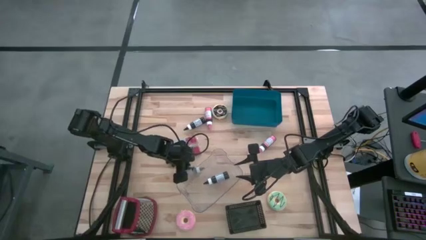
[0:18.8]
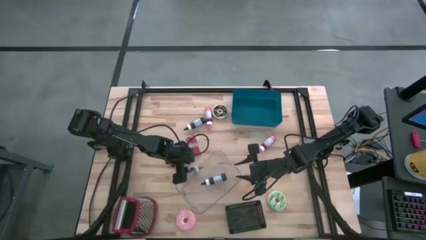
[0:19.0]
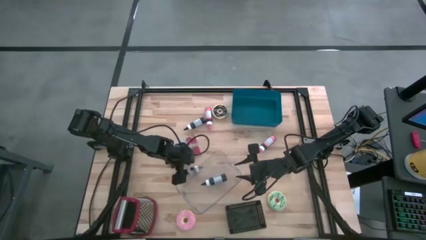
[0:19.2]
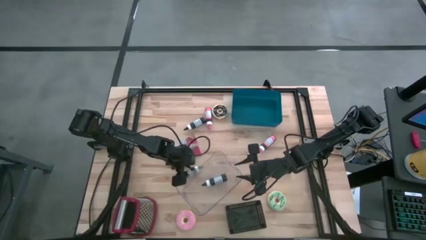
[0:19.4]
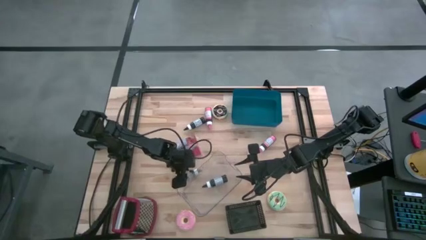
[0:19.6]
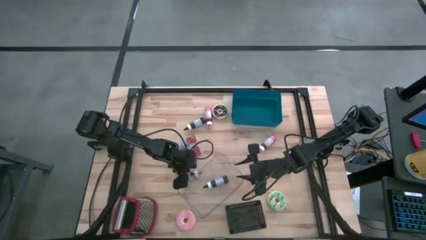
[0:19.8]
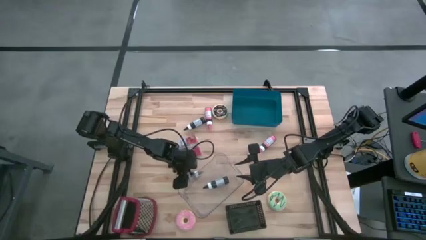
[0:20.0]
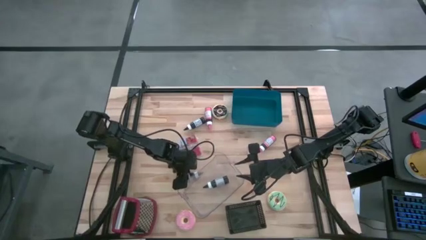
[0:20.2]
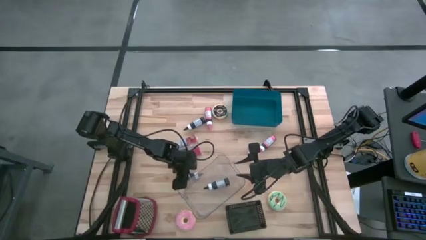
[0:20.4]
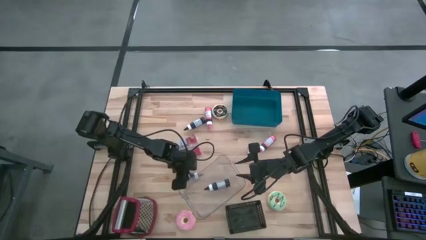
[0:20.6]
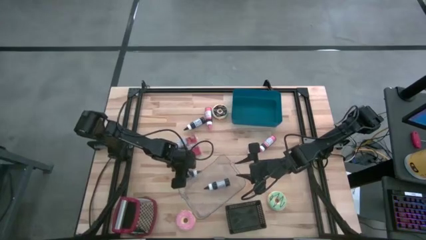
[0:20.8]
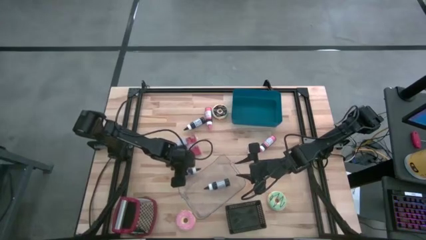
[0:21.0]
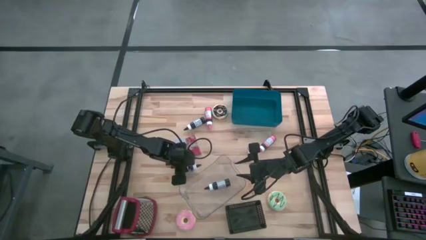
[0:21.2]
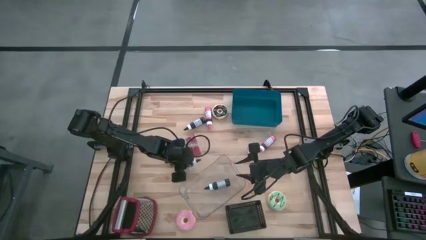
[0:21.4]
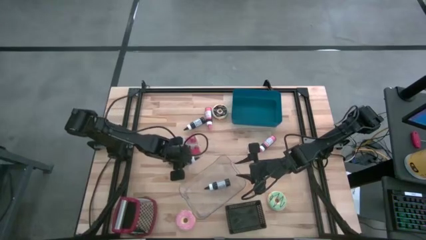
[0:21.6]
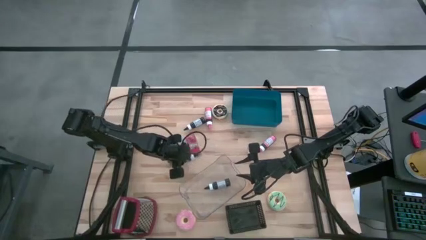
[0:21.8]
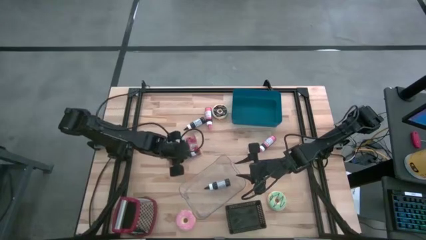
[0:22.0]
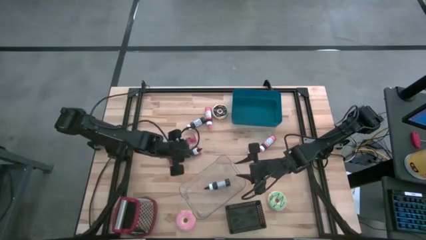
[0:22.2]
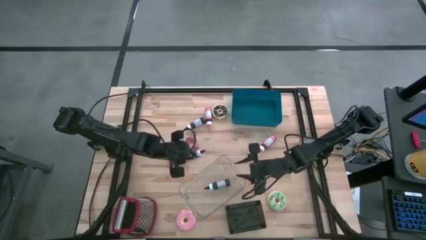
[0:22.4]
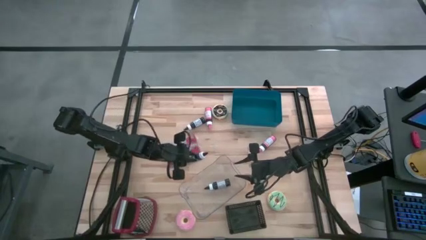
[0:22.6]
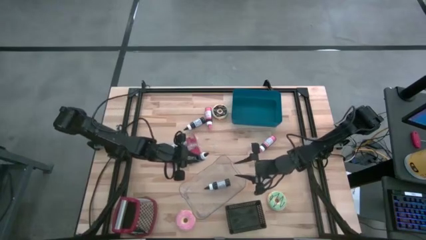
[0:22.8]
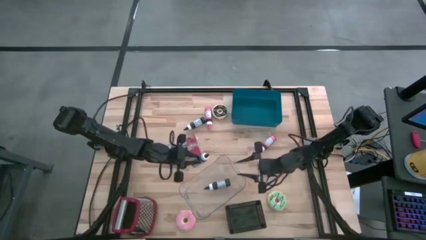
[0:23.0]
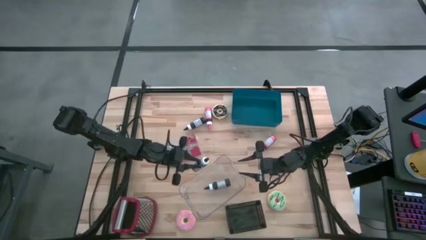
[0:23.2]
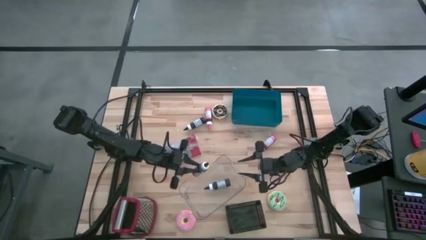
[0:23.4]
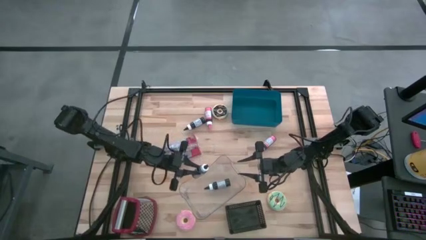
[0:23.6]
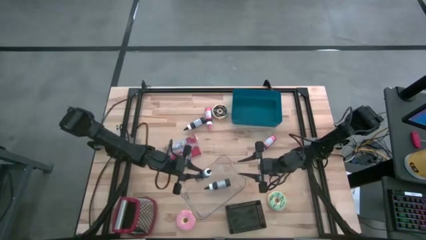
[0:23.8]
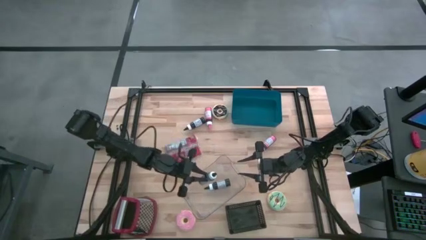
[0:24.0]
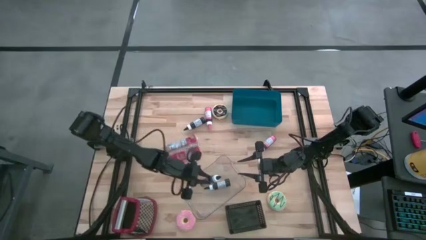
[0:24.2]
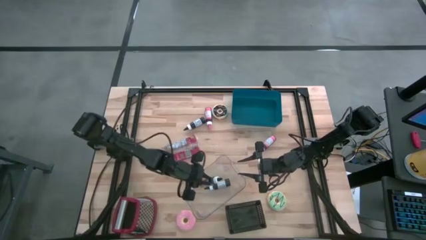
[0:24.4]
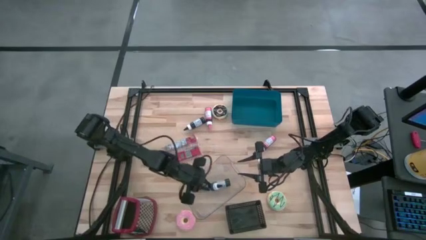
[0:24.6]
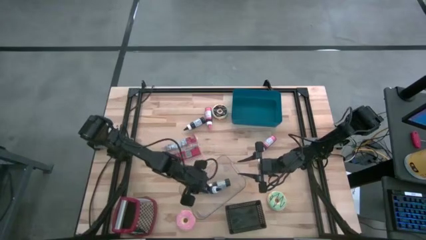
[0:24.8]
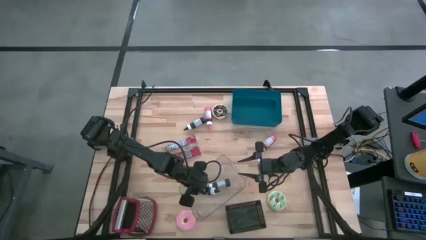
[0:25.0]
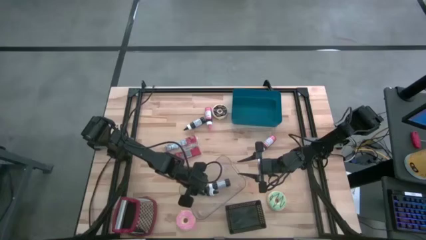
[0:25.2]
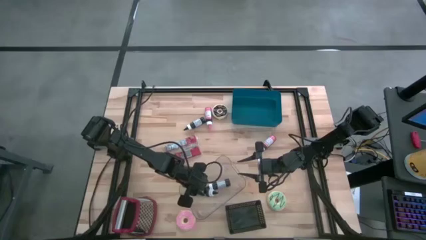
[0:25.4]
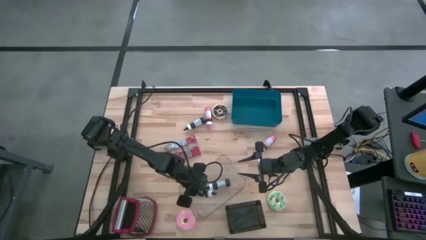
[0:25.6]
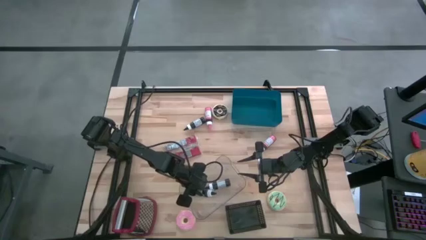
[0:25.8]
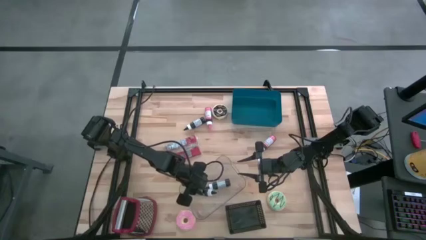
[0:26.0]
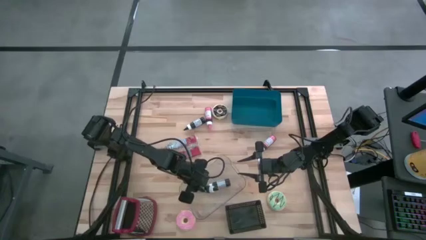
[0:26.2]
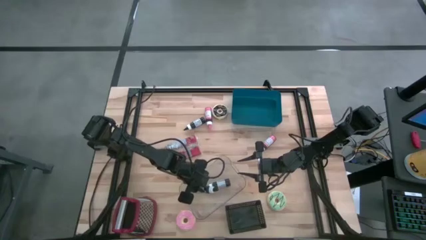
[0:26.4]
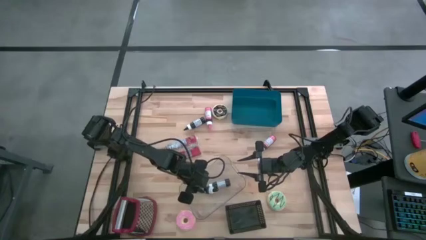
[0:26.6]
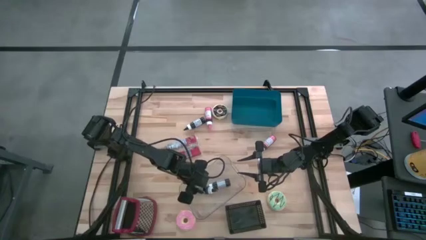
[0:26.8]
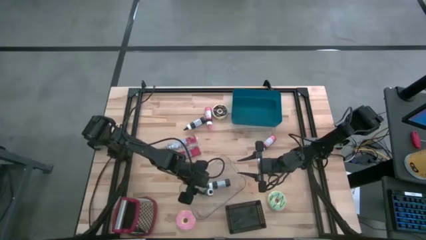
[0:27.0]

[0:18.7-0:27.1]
Put the bottom black food coloring bottle into the transparent bin

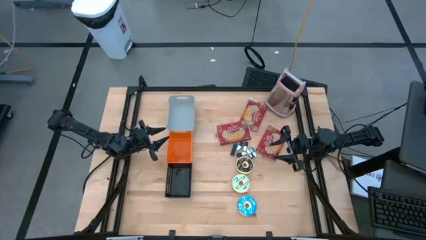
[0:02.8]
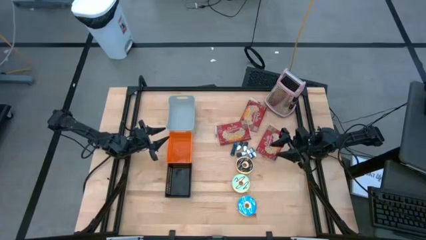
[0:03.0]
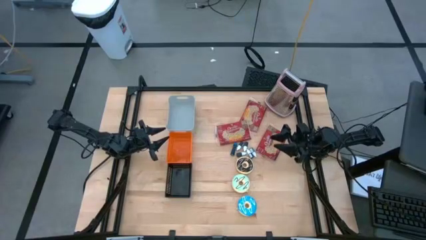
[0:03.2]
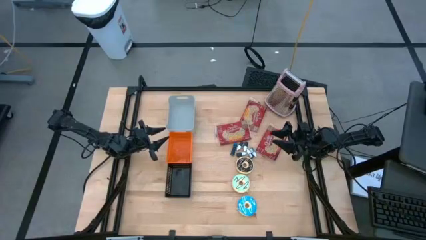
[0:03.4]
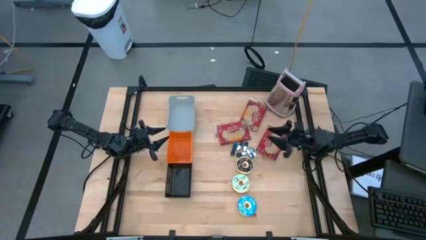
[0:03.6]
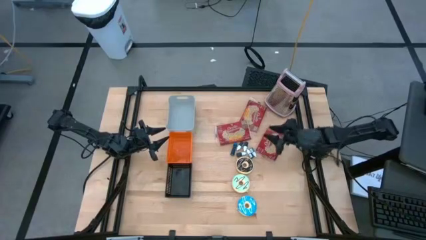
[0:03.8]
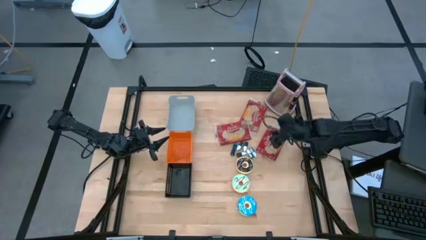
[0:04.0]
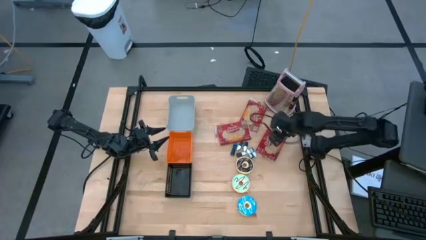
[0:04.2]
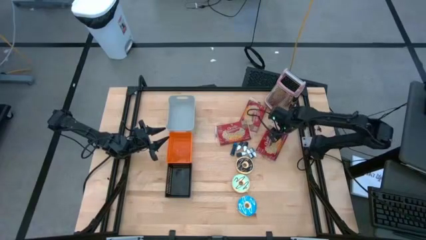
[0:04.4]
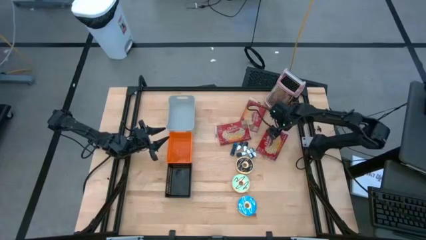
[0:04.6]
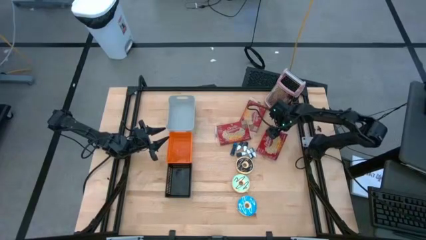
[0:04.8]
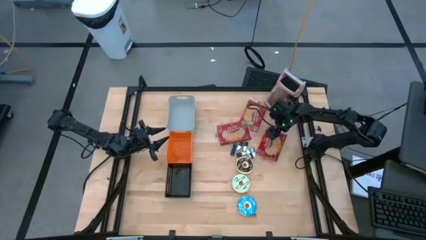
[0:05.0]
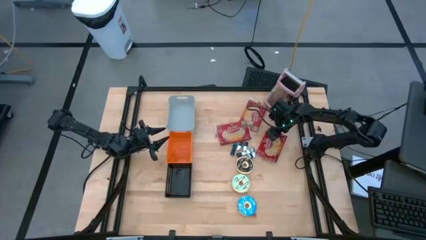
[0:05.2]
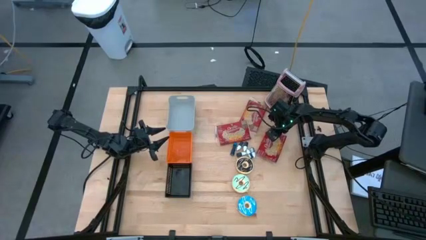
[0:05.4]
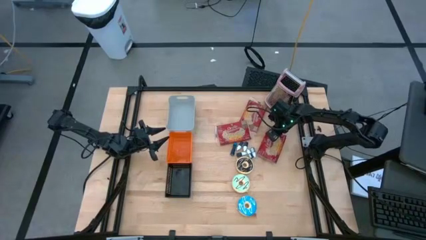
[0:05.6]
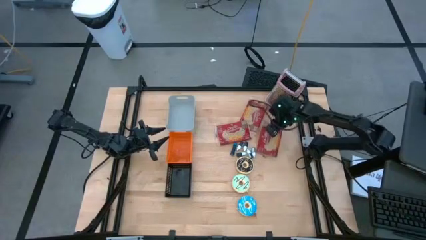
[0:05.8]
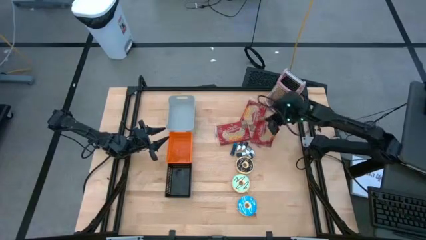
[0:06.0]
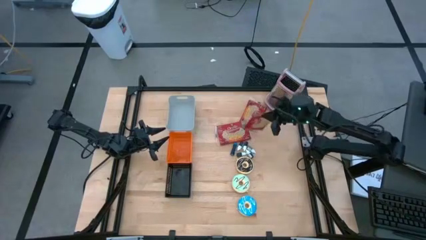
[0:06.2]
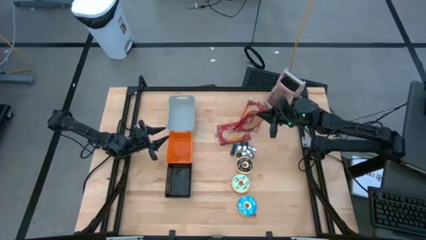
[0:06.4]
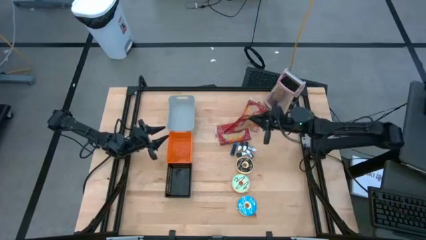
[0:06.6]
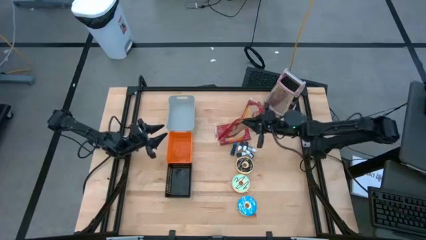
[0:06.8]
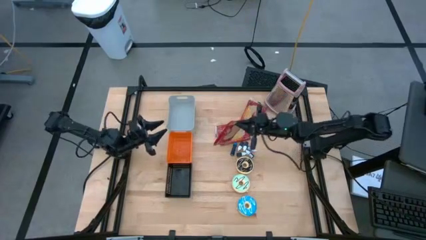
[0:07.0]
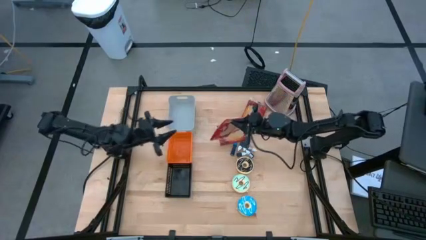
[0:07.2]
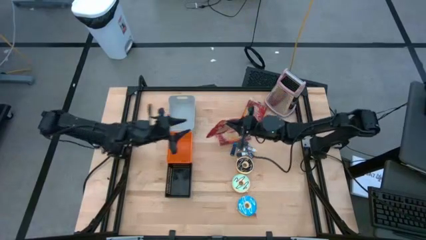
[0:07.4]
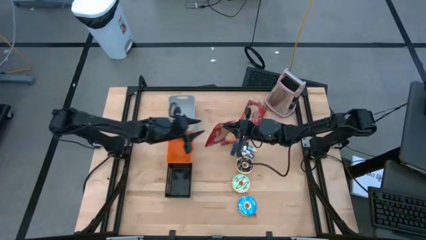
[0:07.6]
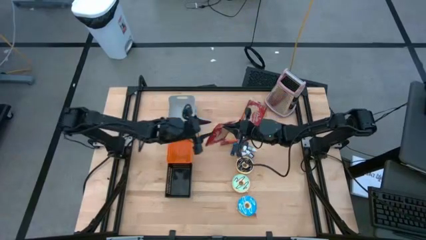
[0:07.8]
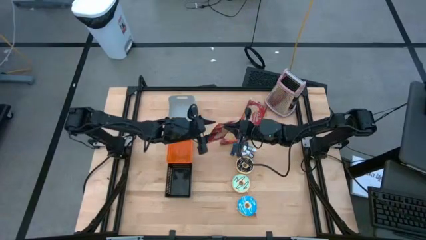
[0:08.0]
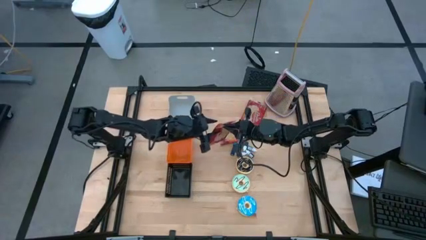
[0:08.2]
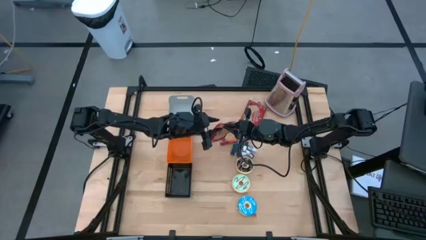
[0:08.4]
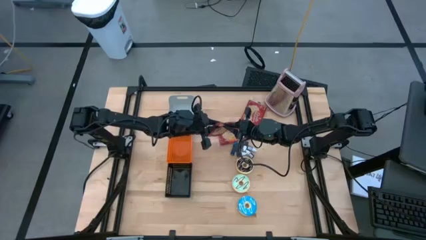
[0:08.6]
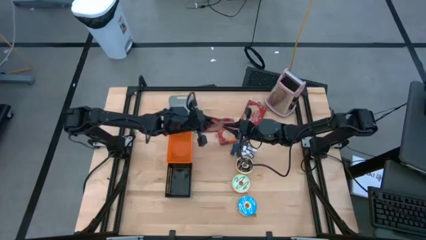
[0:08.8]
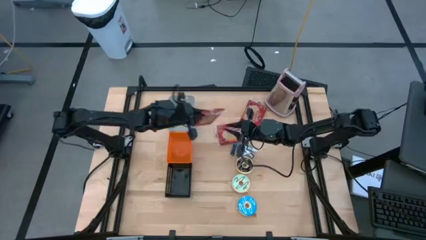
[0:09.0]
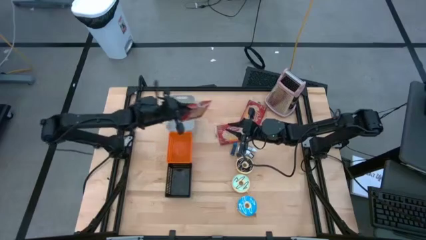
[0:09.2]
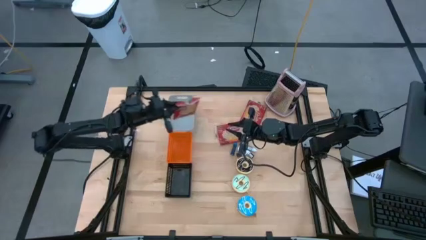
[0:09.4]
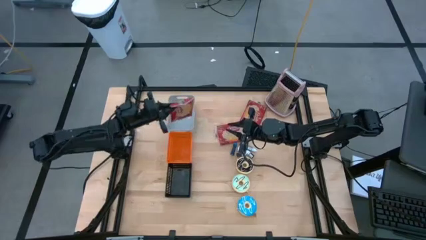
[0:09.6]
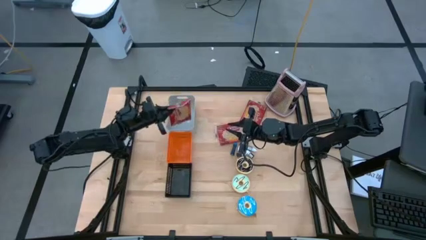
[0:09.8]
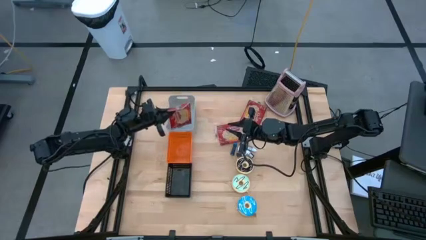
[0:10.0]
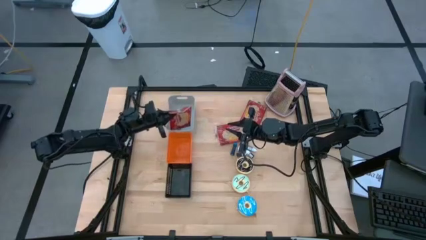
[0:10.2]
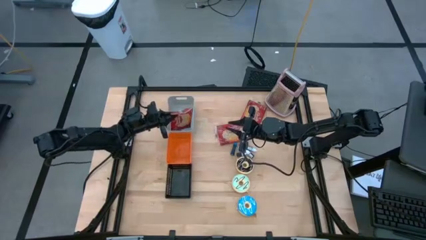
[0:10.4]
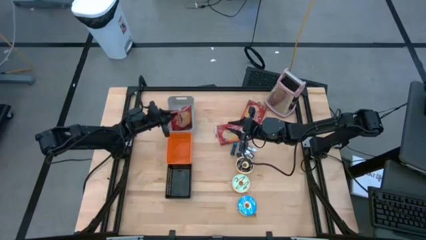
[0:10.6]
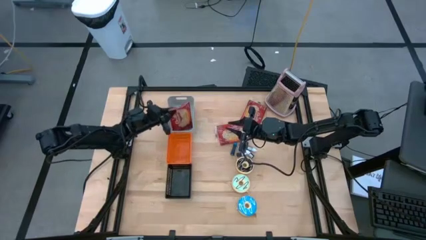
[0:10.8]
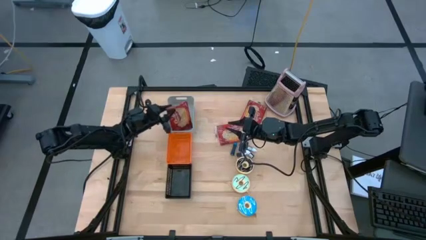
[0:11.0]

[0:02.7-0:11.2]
Put the bottom right red popcorn bag into the gray bin
